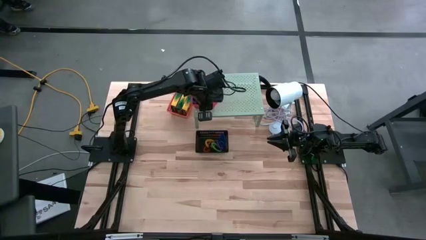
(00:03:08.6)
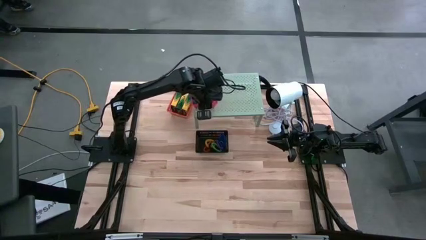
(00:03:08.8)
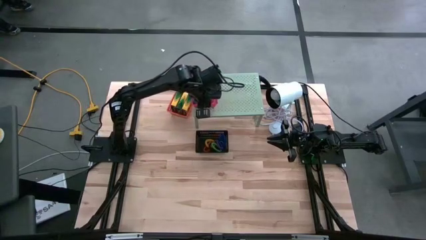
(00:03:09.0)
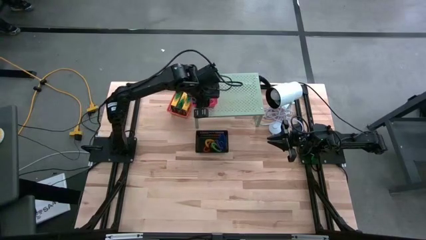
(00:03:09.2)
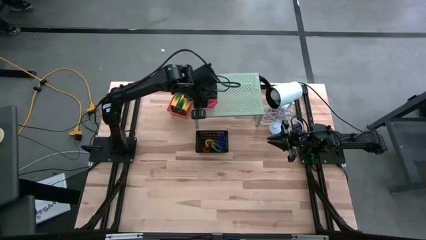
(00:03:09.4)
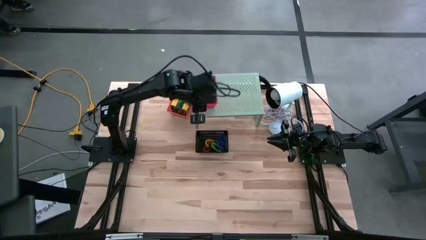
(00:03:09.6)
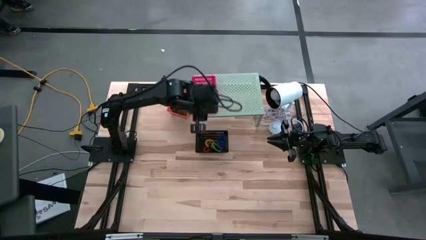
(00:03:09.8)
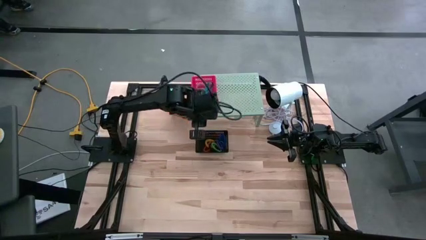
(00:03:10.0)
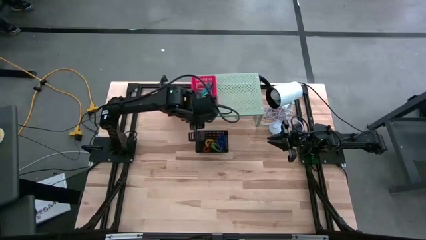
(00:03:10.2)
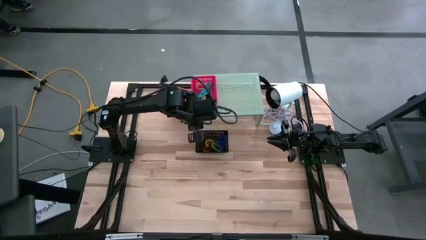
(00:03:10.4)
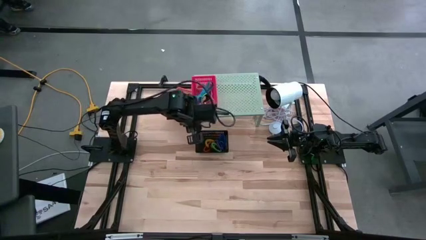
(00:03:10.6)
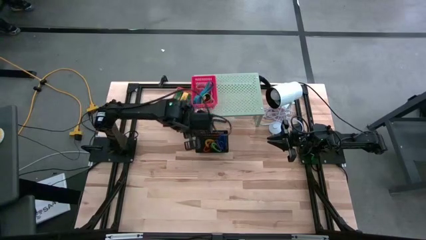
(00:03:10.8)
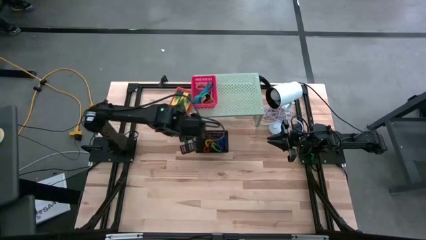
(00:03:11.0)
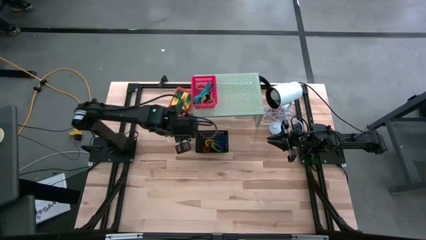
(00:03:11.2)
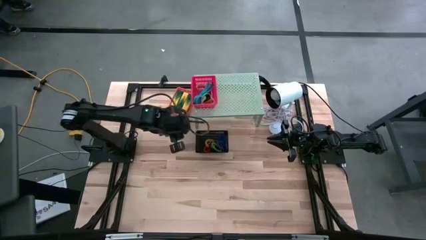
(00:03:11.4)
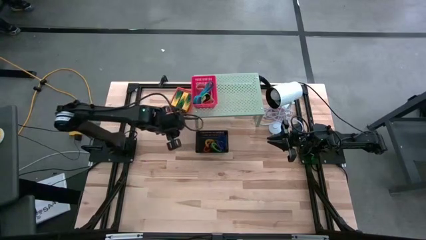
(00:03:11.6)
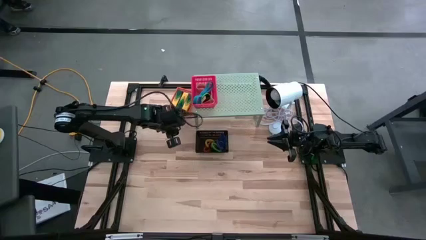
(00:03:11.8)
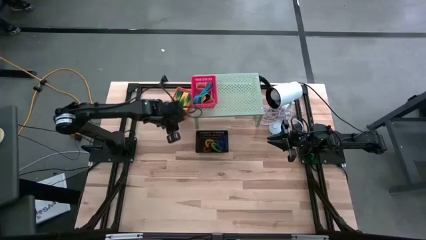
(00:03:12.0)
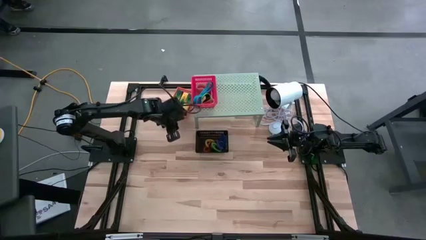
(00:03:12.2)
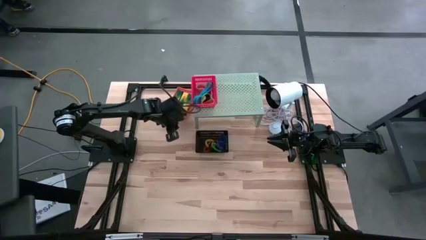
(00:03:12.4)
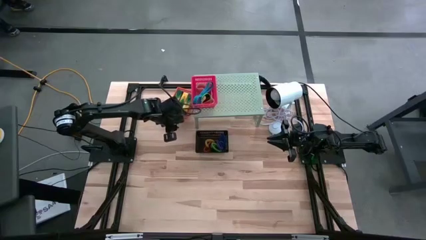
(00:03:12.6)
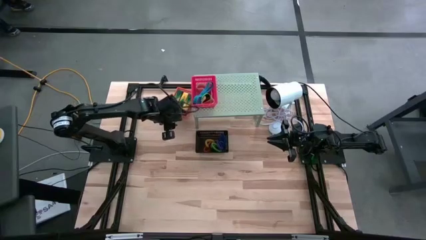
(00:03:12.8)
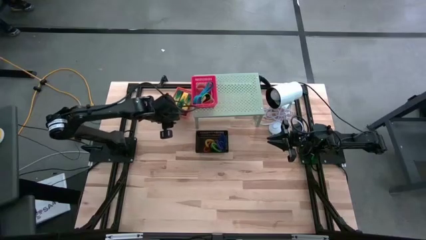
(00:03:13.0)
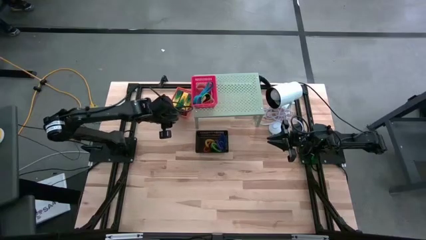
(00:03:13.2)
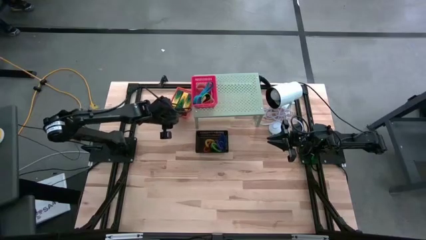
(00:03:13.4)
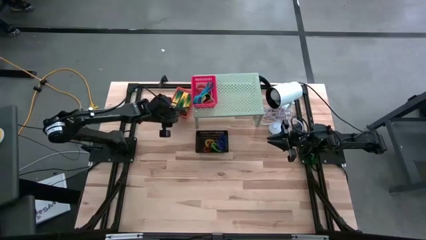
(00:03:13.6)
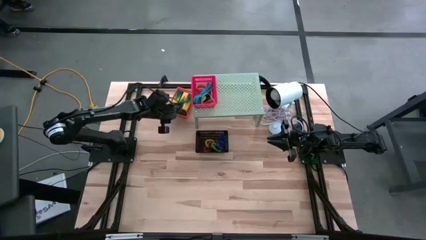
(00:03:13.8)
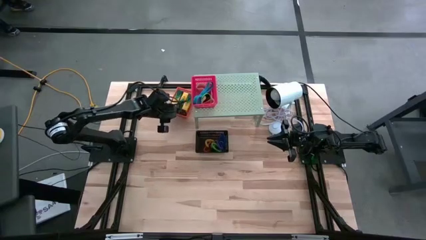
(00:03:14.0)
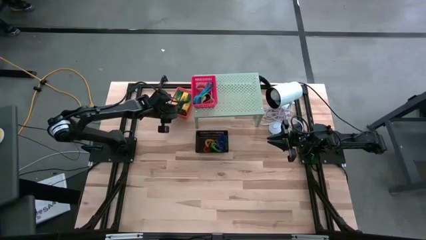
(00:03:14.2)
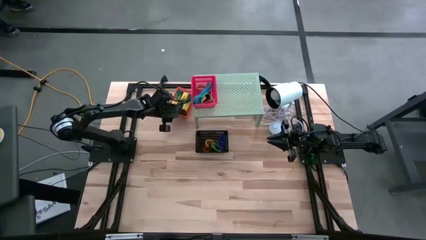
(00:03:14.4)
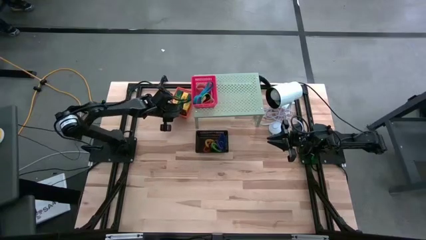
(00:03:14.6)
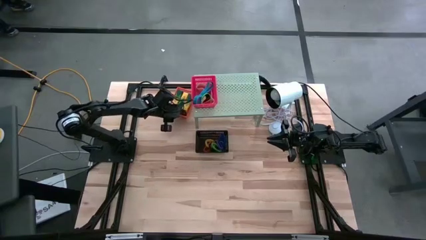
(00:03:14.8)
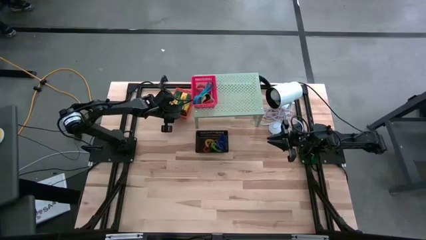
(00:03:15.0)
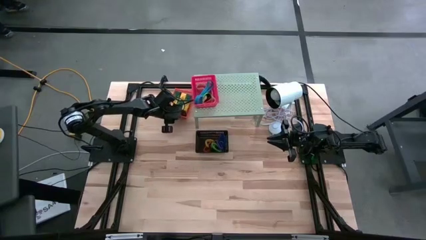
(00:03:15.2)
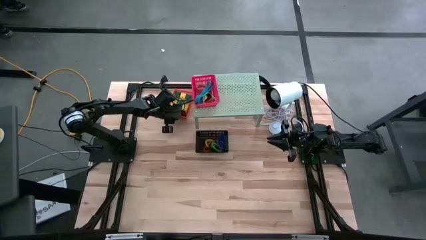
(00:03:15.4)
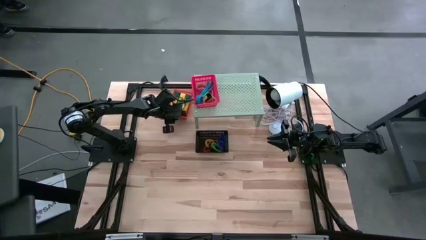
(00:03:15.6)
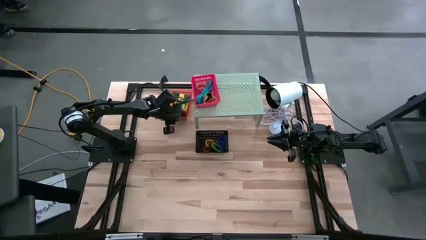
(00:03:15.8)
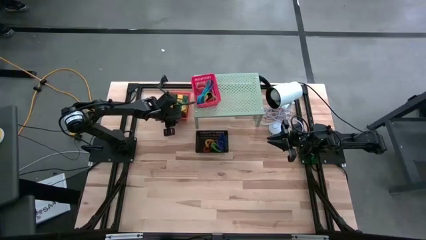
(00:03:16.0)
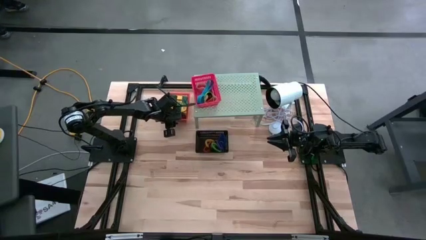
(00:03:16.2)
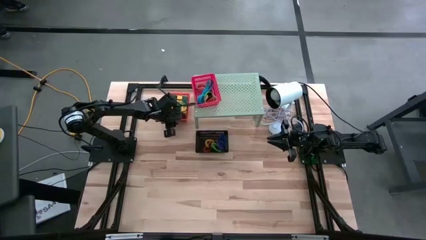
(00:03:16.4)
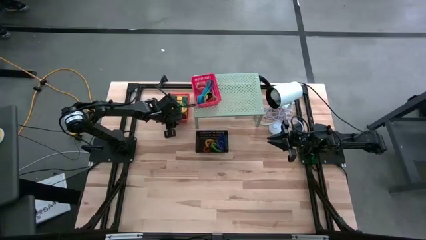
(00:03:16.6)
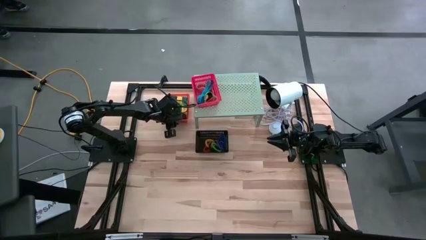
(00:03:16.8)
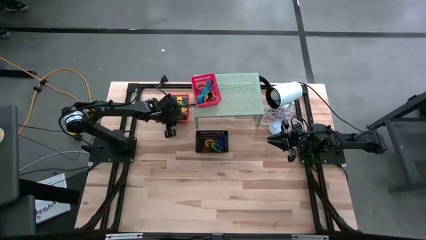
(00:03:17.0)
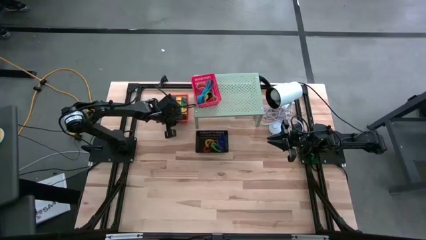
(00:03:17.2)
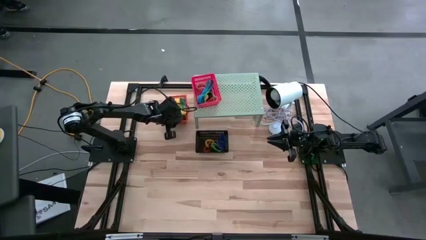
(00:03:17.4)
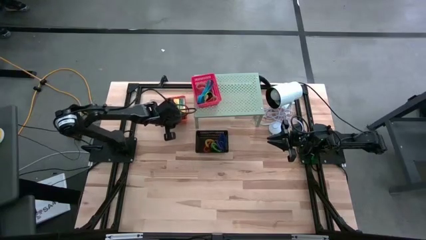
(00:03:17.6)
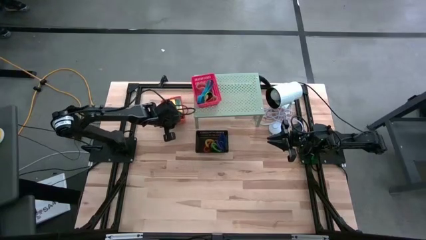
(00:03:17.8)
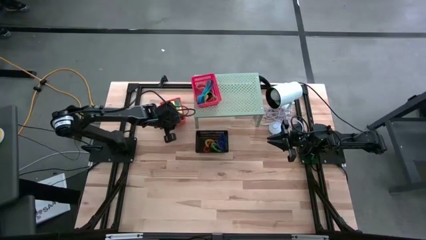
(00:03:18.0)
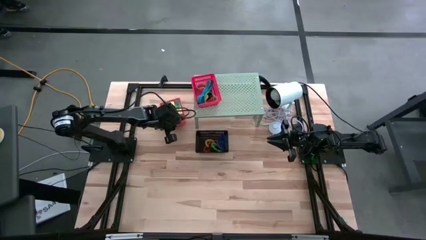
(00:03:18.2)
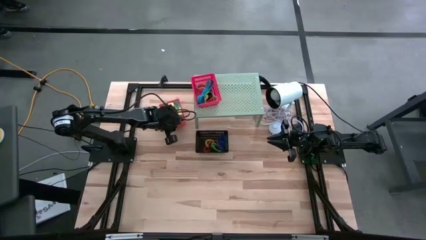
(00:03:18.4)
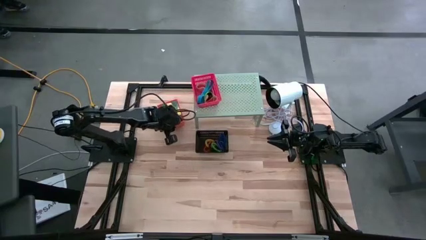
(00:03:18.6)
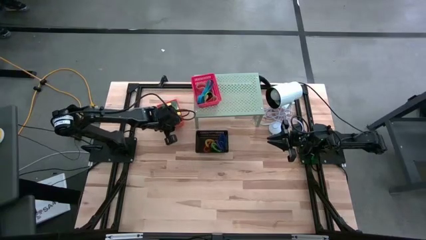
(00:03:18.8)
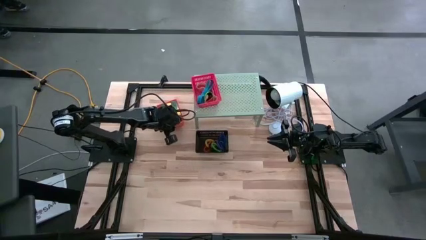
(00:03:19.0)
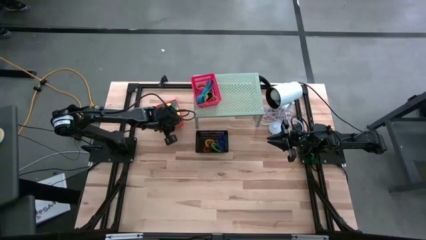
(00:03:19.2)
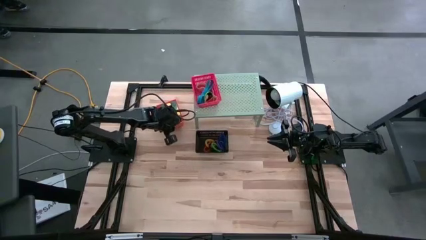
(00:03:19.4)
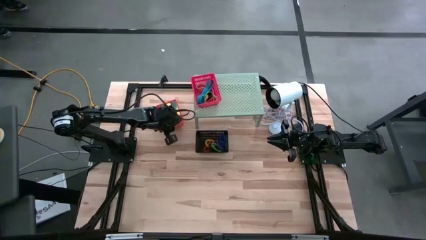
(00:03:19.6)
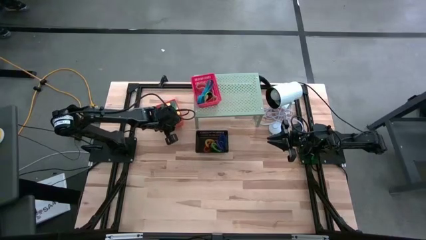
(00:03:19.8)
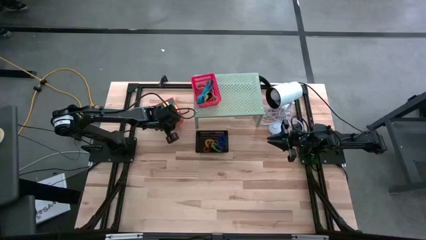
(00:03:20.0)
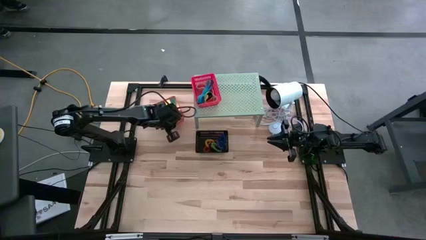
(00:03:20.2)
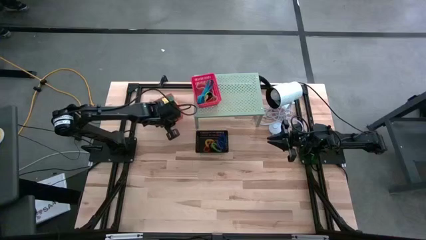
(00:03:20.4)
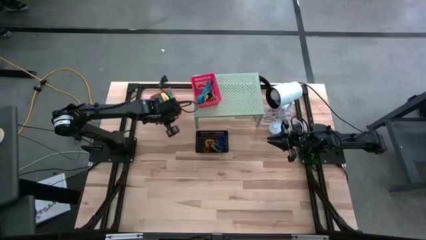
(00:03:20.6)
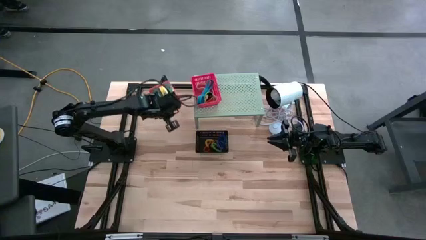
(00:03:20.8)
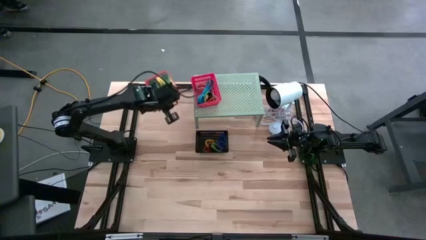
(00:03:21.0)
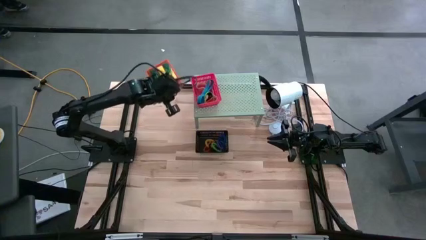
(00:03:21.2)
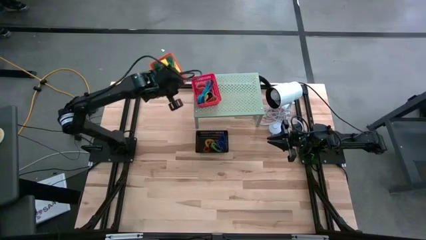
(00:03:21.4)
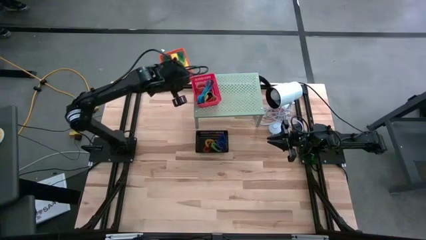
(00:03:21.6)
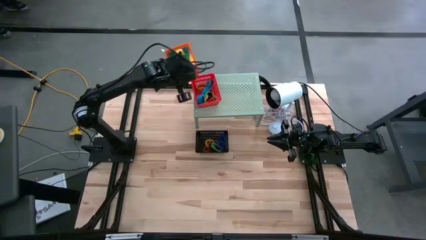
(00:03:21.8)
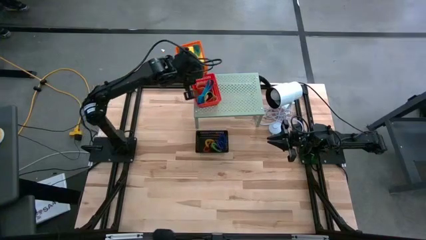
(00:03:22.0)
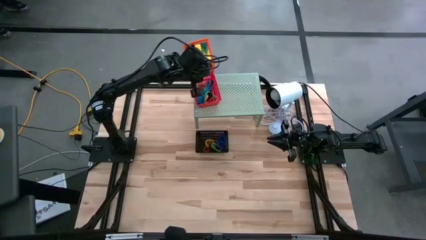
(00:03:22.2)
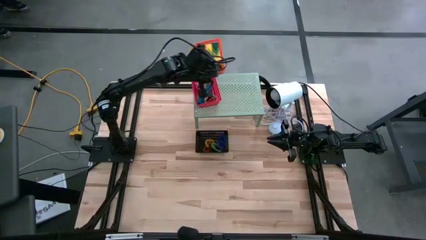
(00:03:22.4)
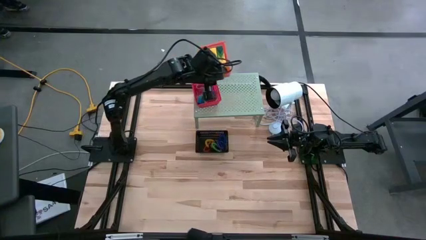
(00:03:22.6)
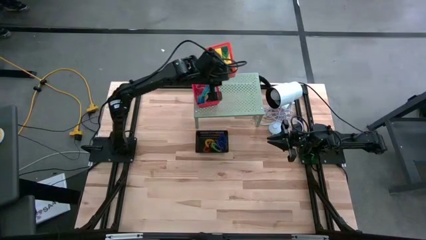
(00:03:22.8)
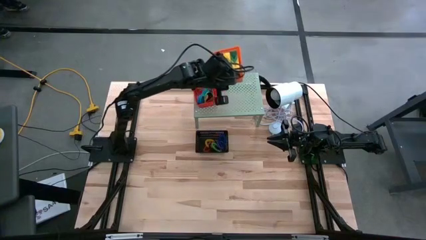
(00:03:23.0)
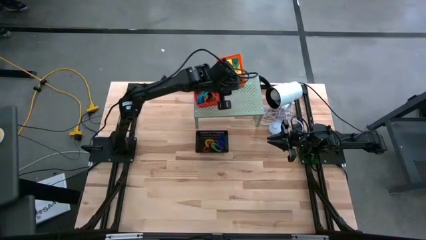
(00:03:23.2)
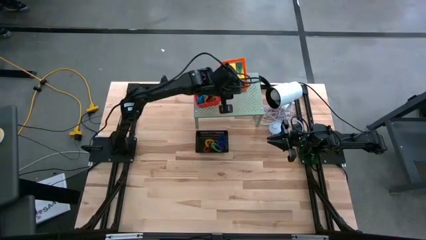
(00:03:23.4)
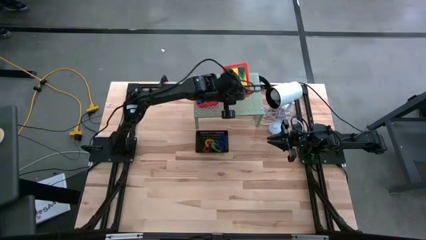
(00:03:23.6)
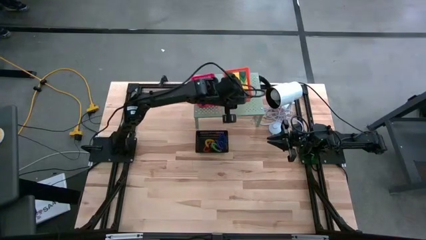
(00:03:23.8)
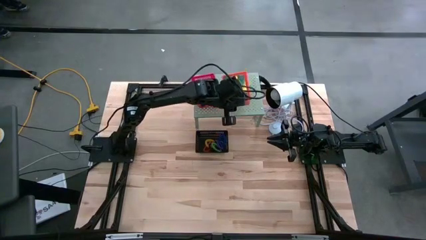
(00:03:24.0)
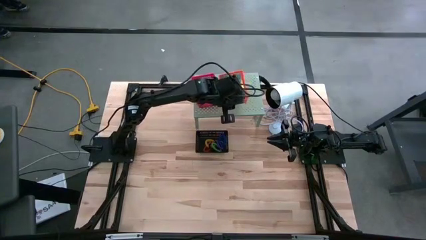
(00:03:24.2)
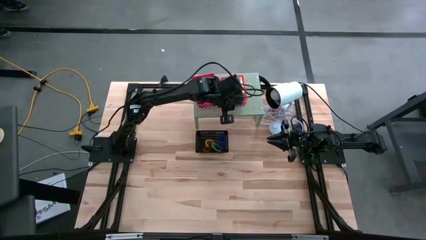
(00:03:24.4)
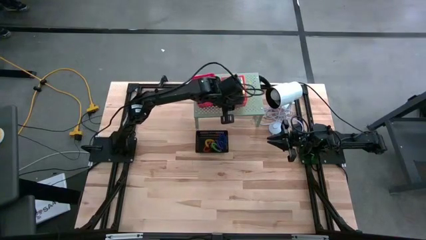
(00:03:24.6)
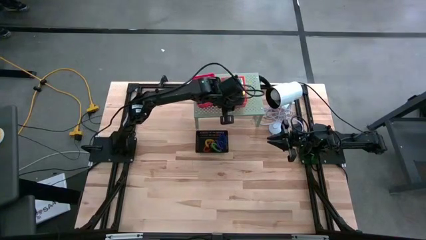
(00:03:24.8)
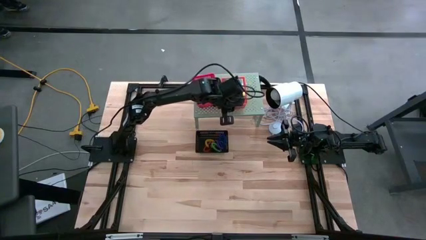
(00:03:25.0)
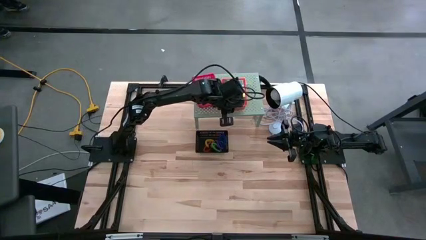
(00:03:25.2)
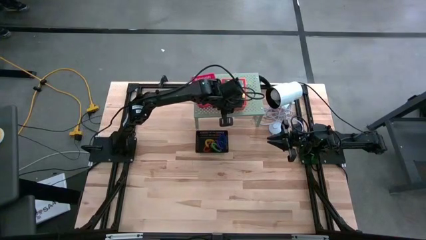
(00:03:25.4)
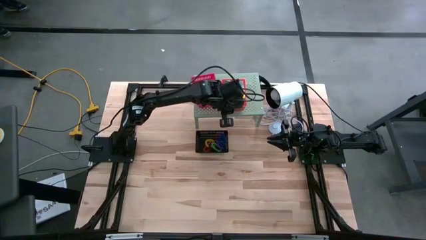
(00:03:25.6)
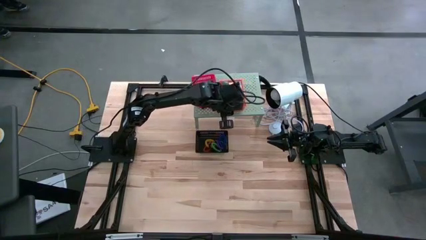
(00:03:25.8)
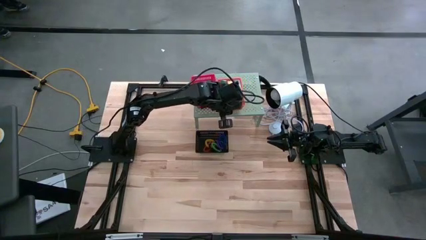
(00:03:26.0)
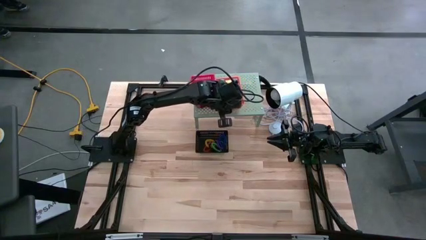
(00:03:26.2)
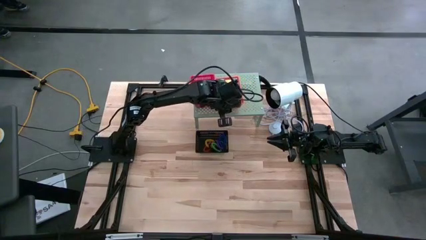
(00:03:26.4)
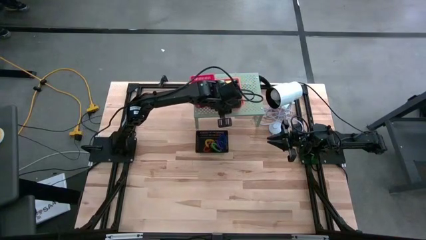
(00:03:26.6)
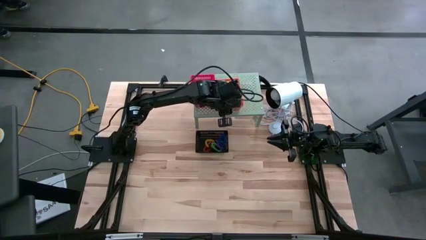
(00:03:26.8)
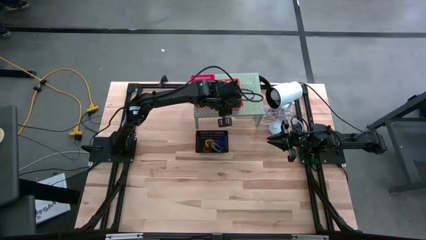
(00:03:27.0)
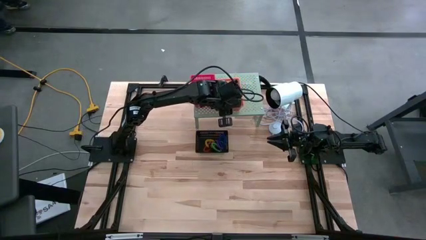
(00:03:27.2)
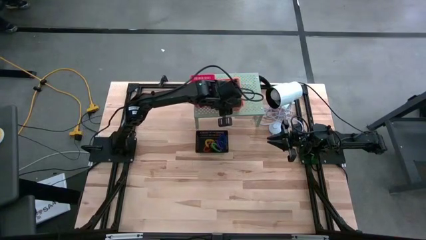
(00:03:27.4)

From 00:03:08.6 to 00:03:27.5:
Task: Pick & Place Office Desk Supplies
Put the orange bin with the crayon boxes on the shelf
